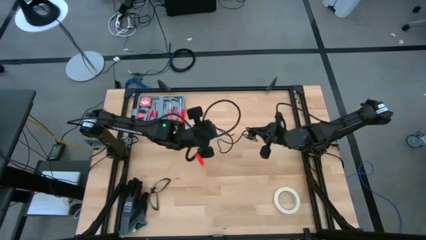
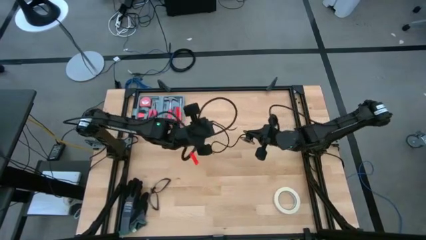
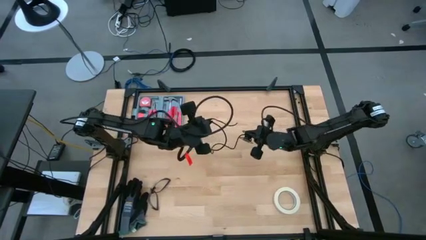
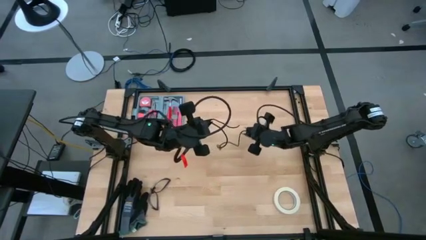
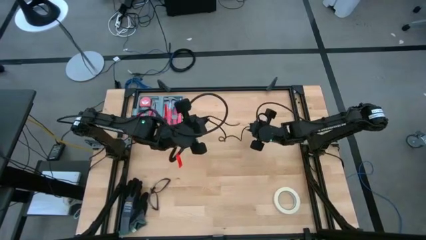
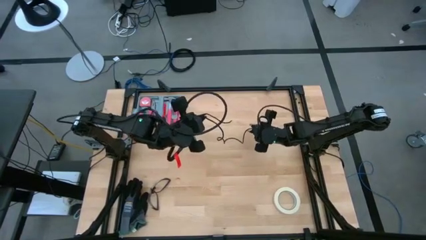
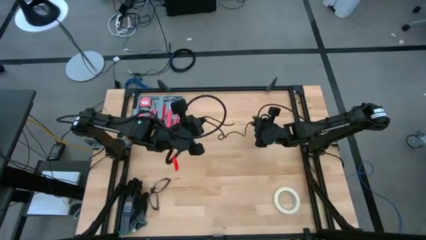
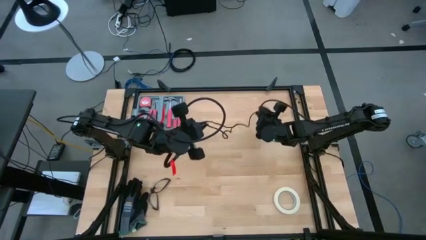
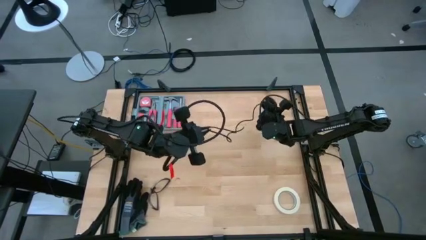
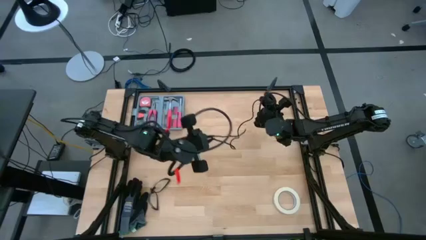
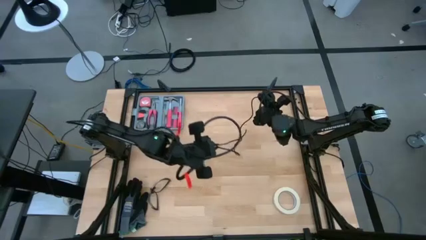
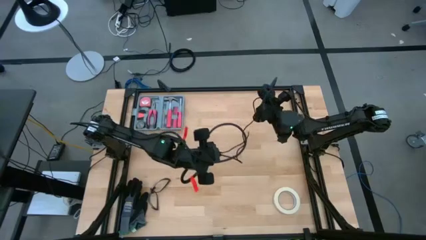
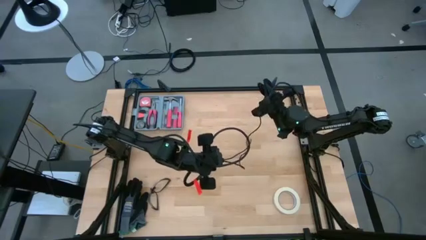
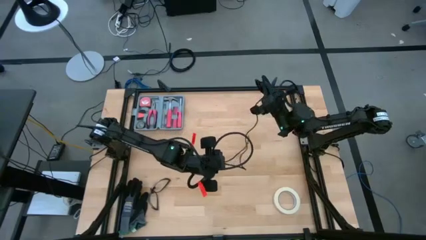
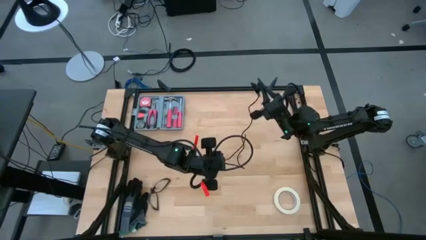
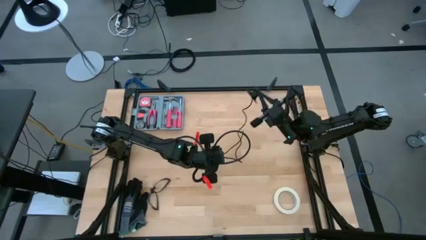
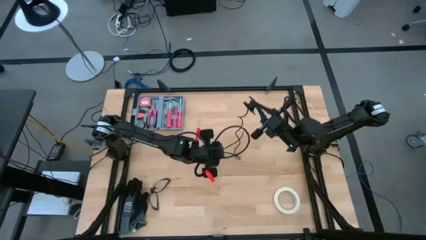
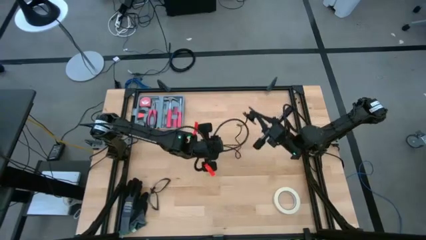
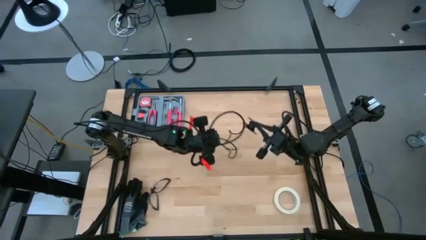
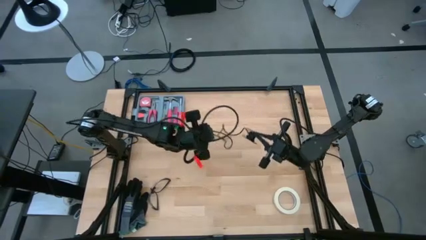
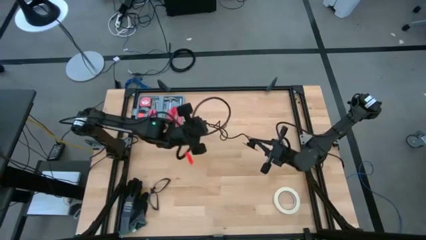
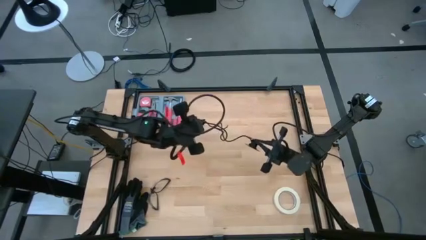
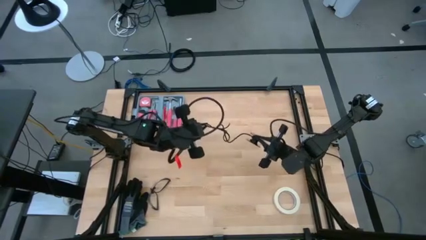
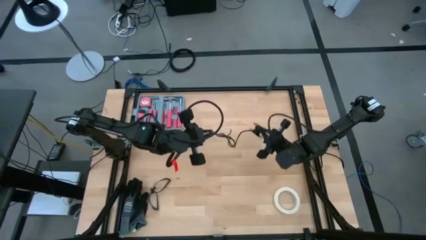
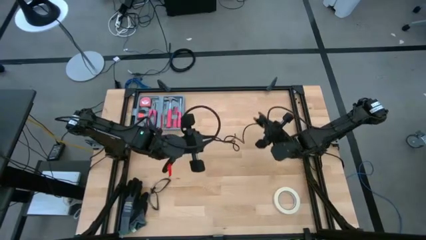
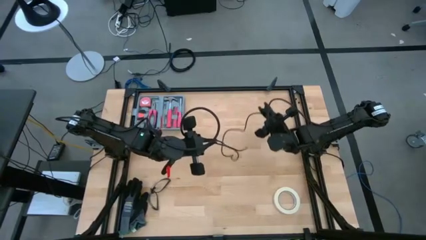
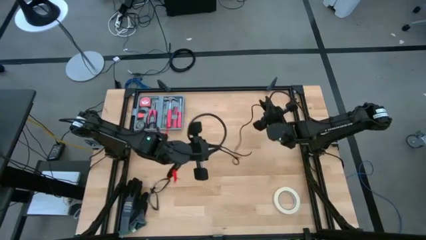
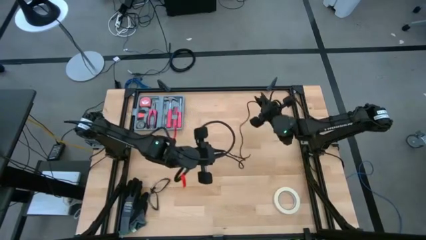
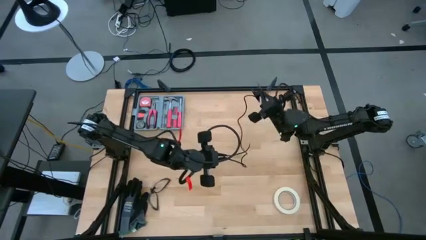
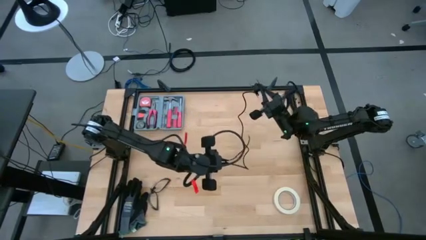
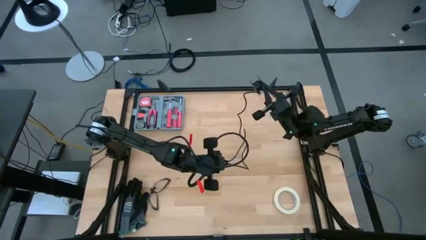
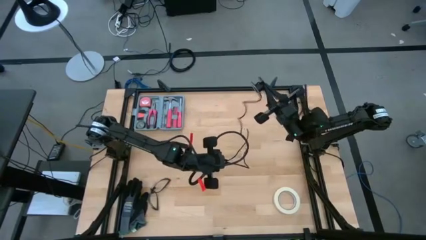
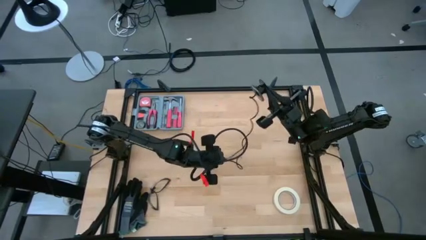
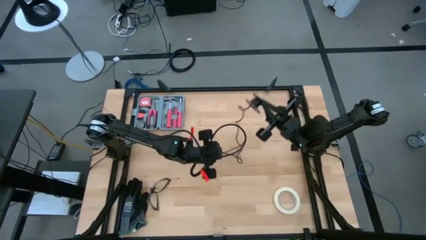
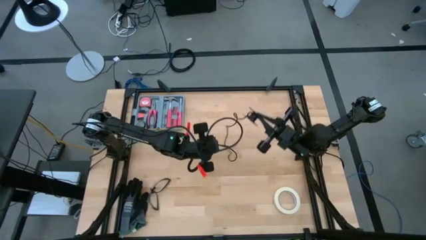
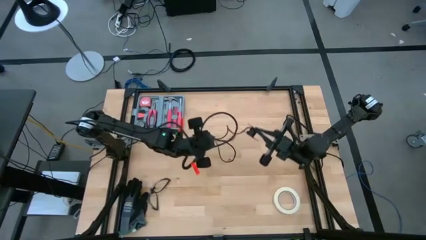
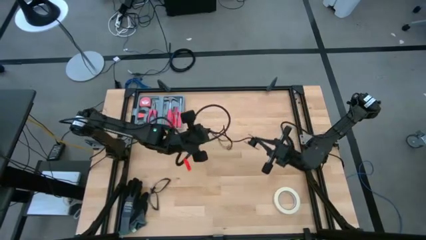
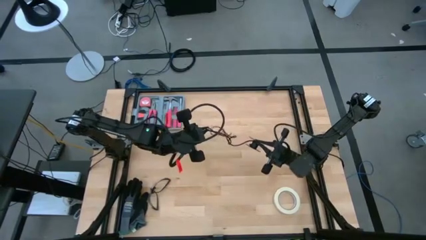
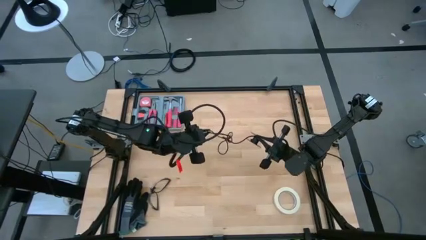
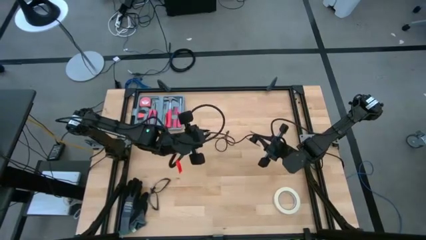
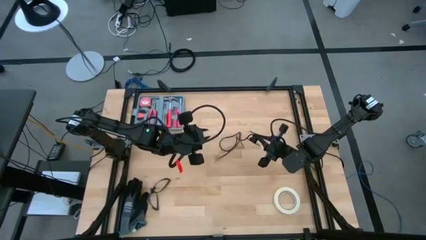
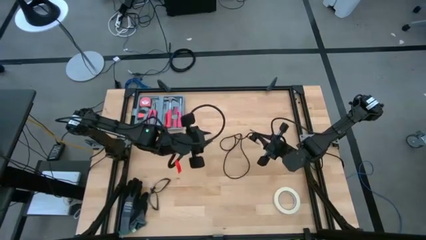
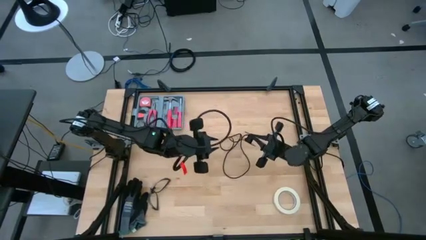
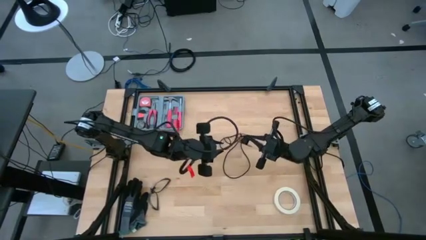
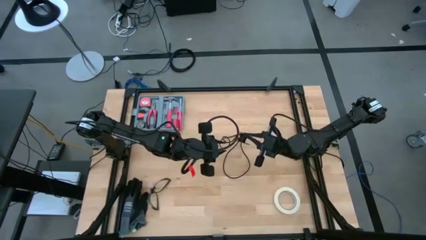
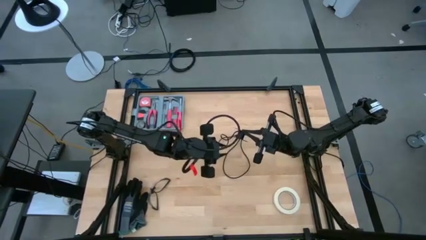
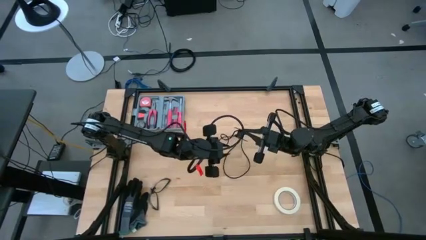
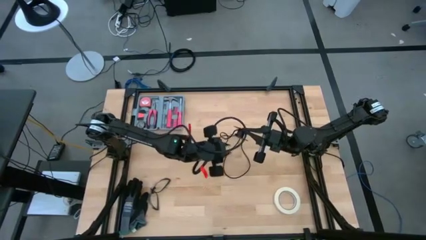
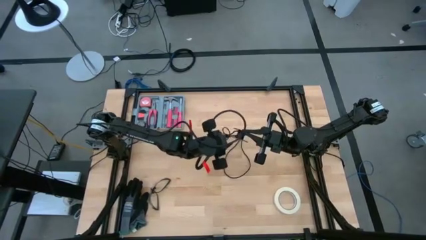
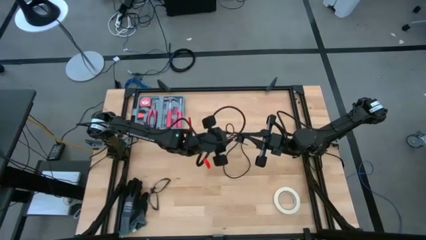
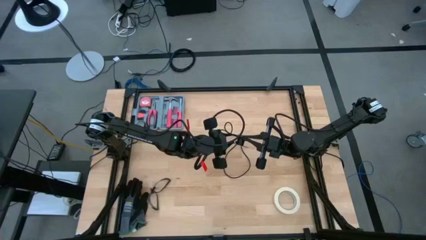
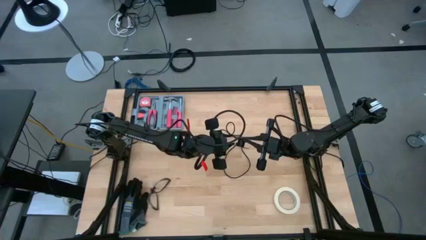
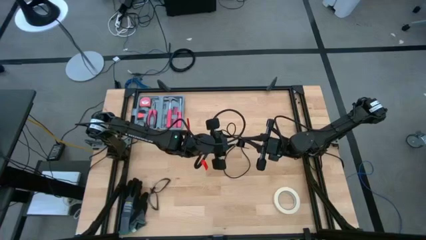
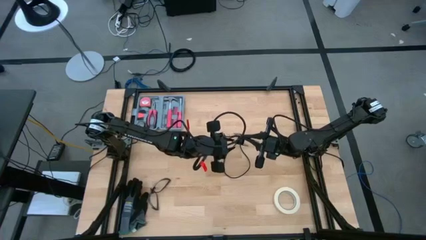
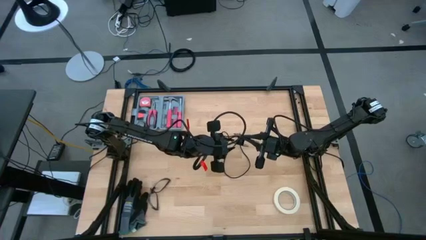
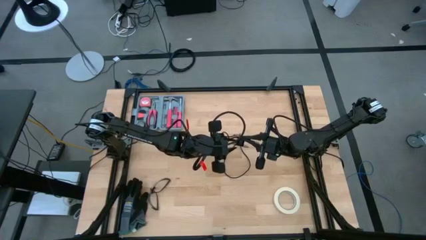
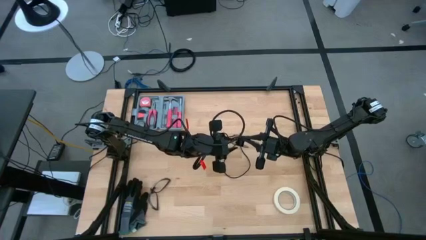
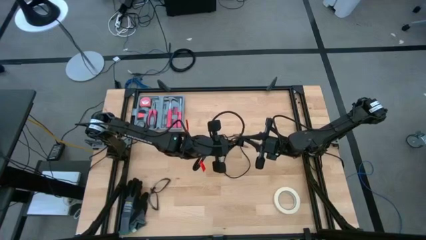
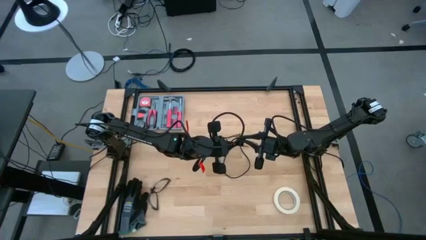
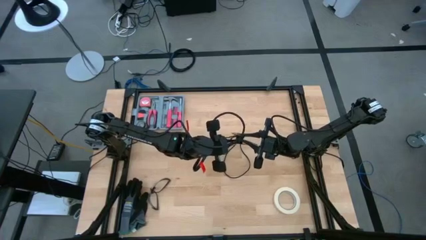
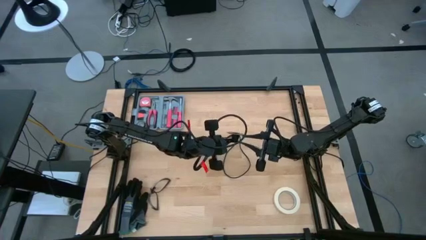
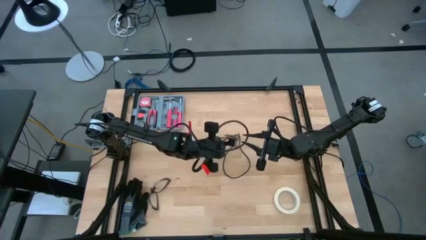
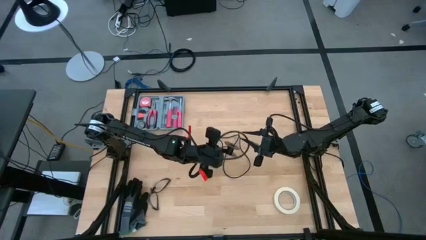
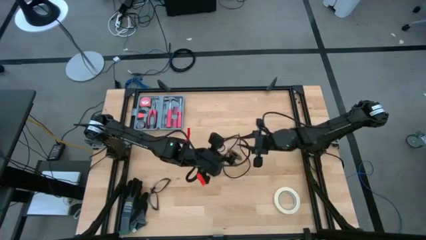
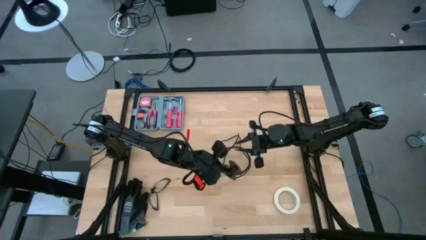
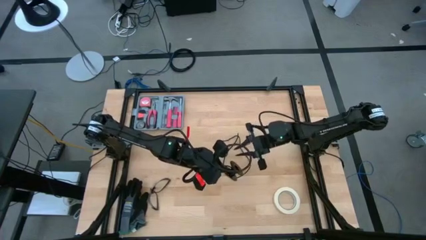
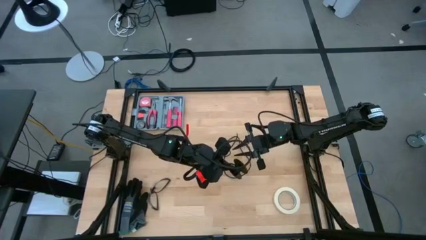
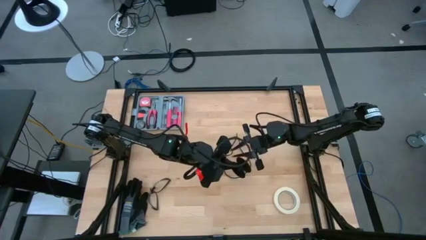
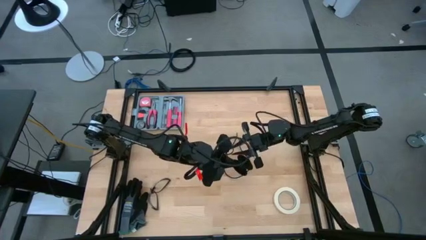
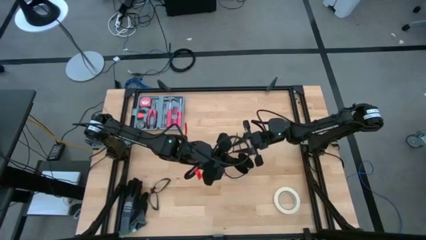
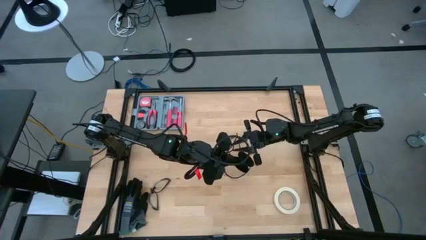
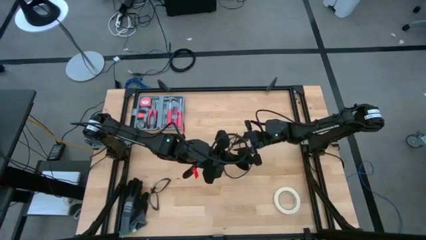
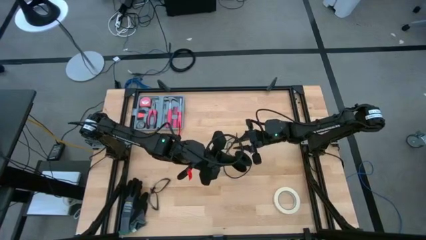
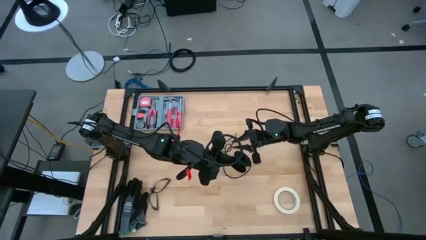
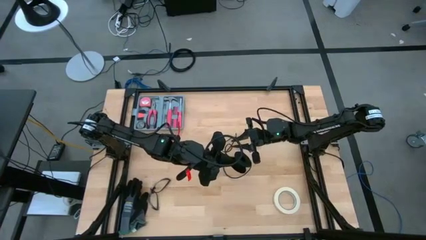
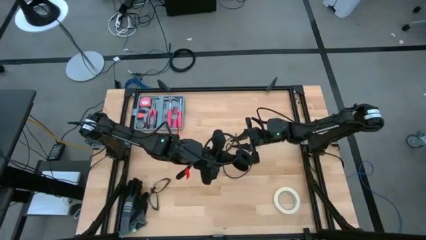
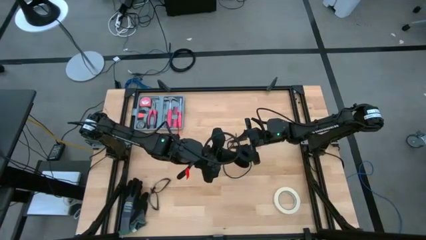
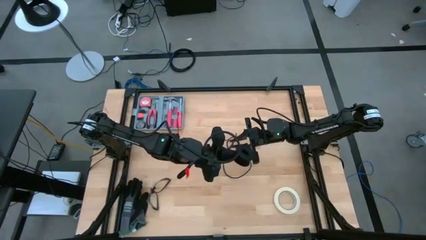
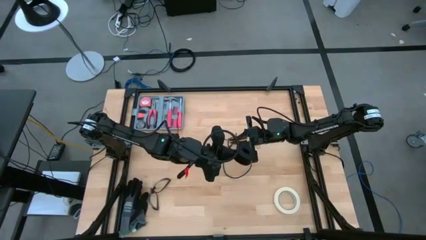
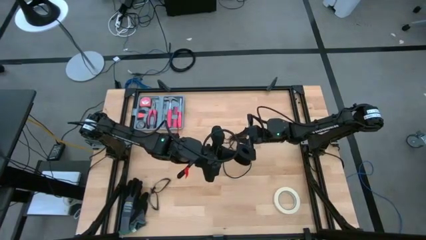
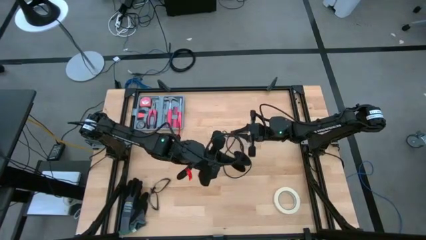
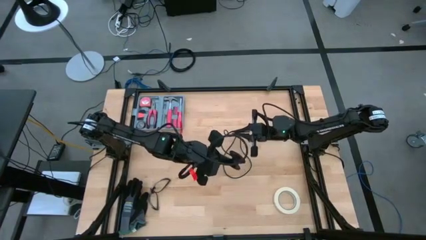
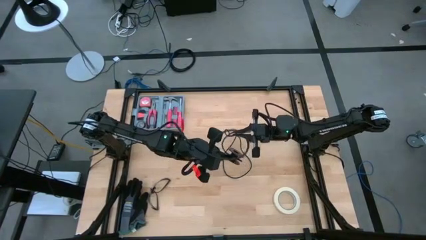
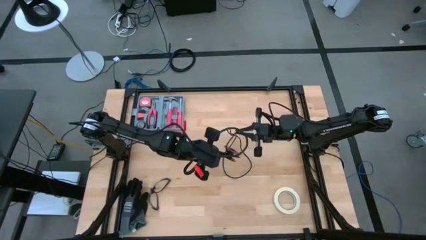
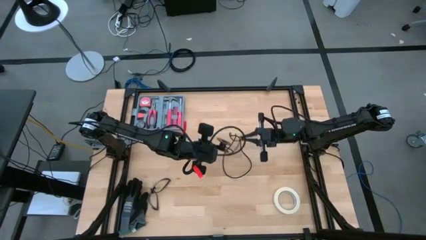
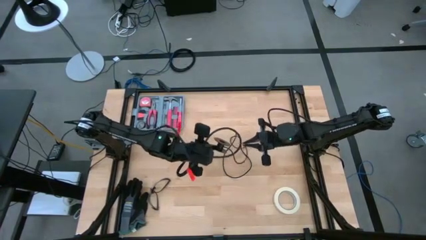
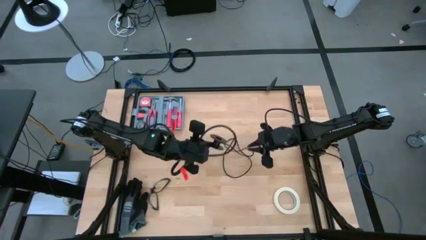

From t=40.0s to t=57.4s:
Task: Coil cords
Uncoil the black wire from the spool
